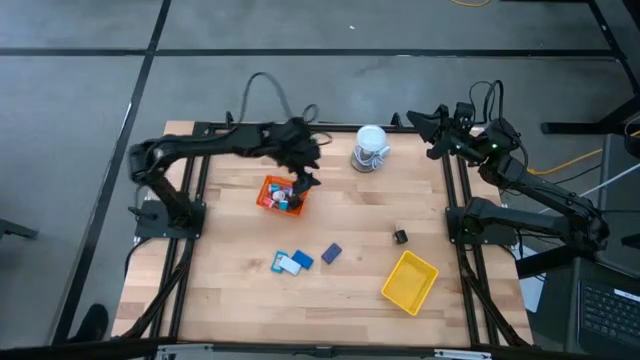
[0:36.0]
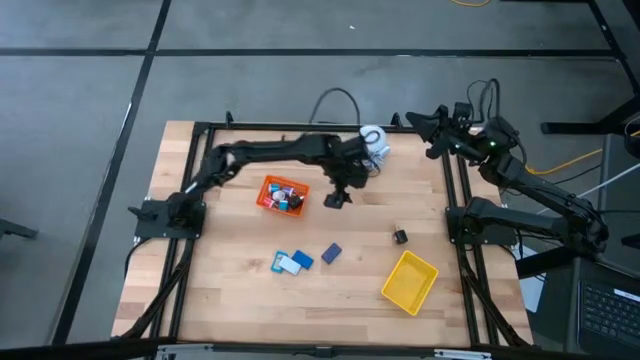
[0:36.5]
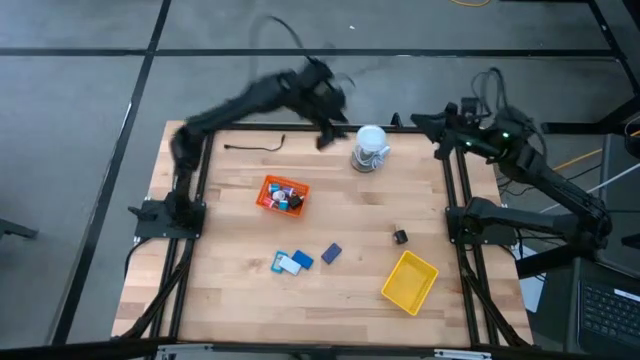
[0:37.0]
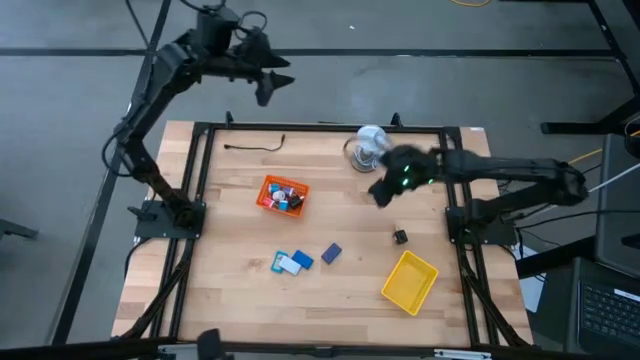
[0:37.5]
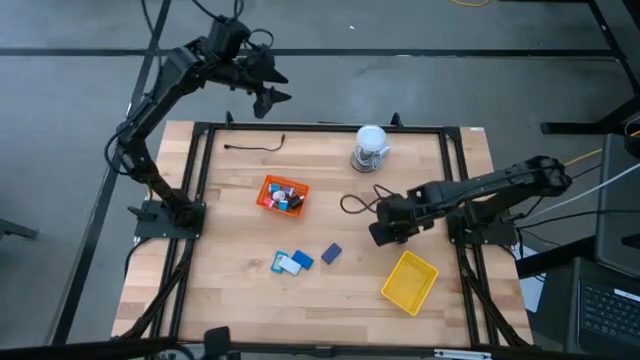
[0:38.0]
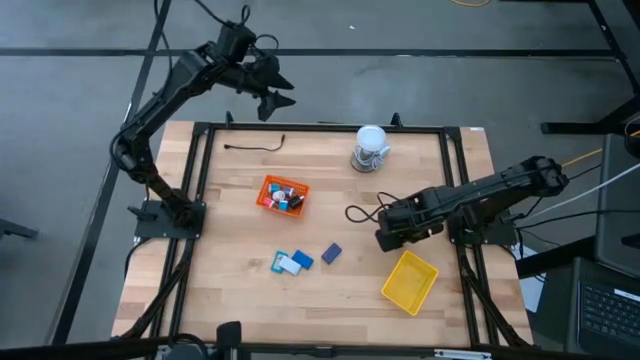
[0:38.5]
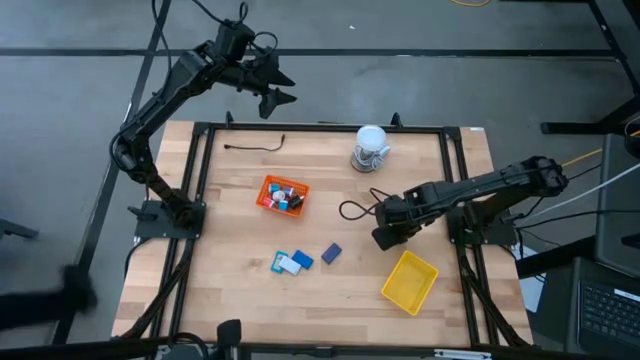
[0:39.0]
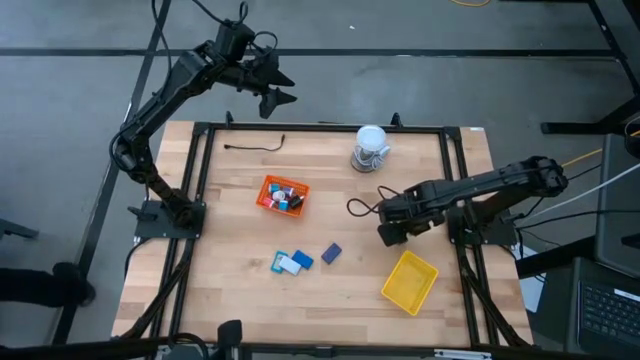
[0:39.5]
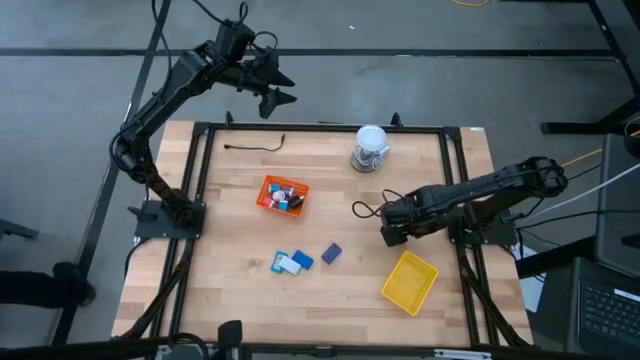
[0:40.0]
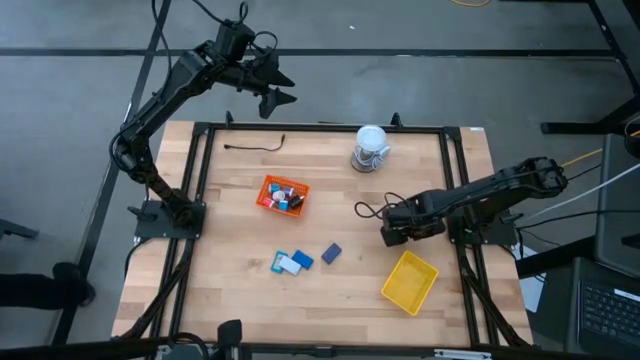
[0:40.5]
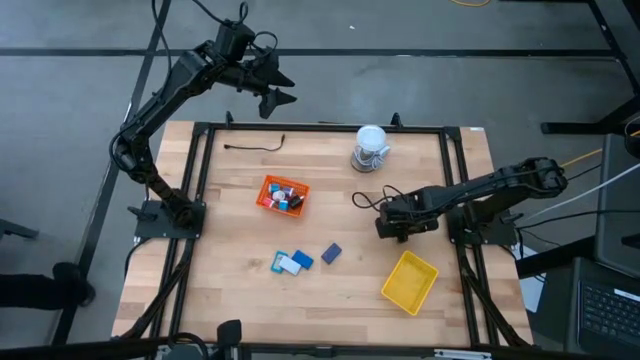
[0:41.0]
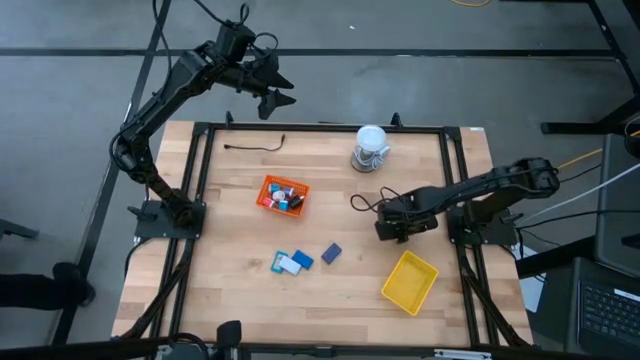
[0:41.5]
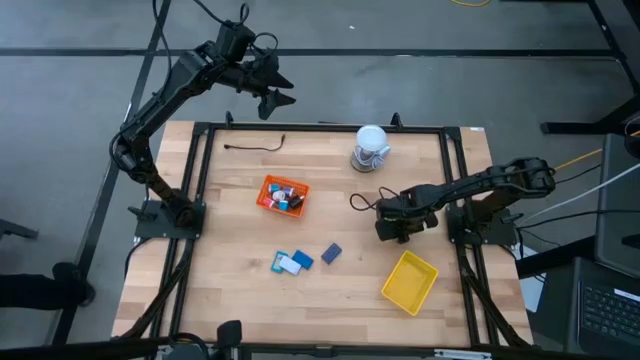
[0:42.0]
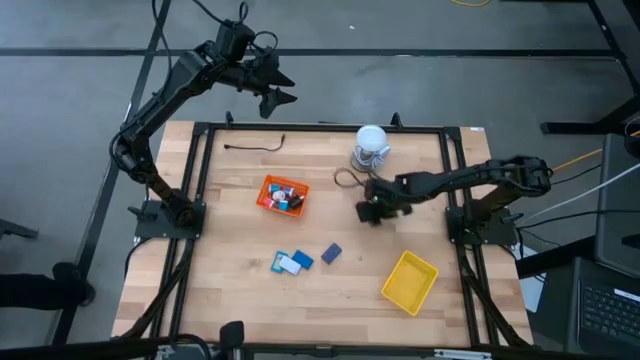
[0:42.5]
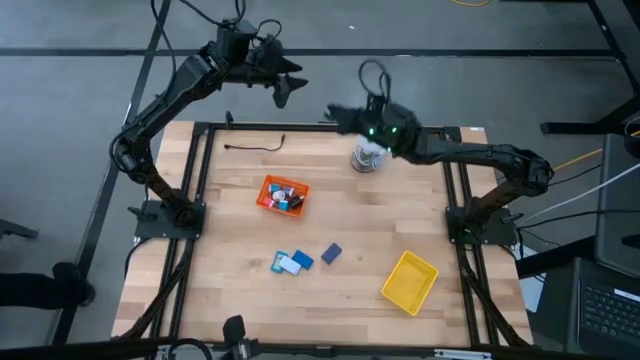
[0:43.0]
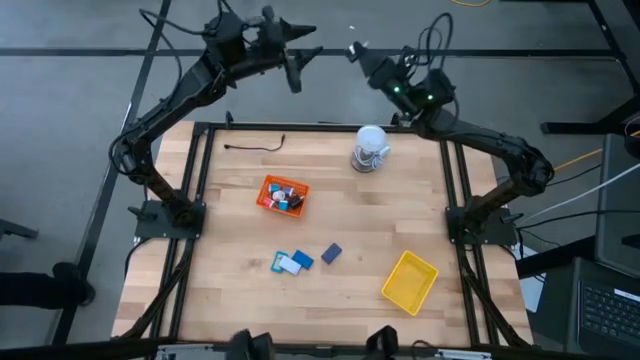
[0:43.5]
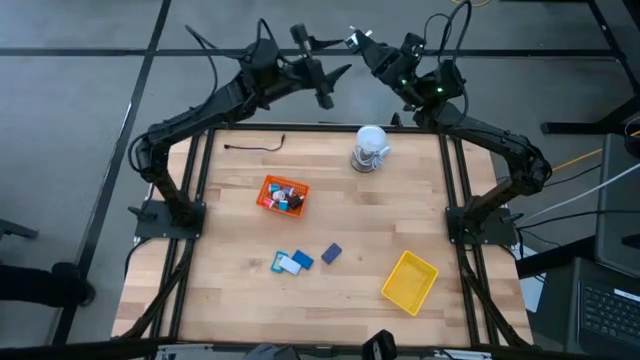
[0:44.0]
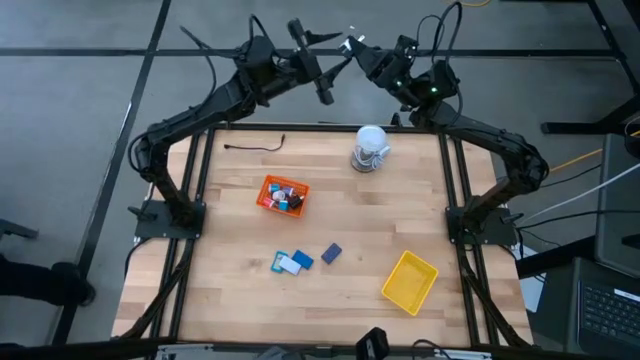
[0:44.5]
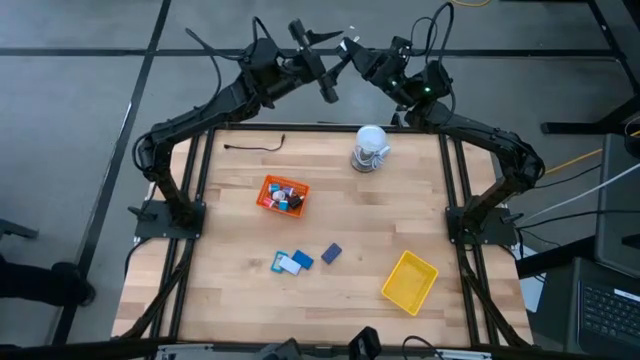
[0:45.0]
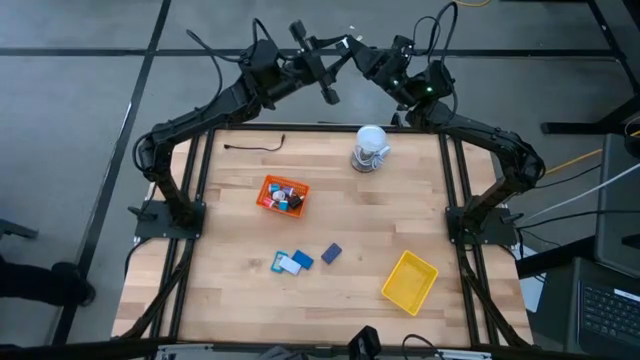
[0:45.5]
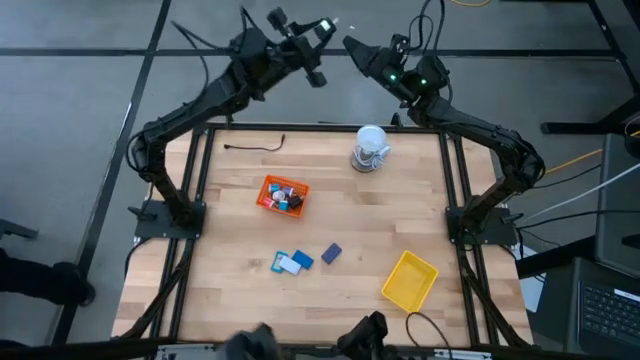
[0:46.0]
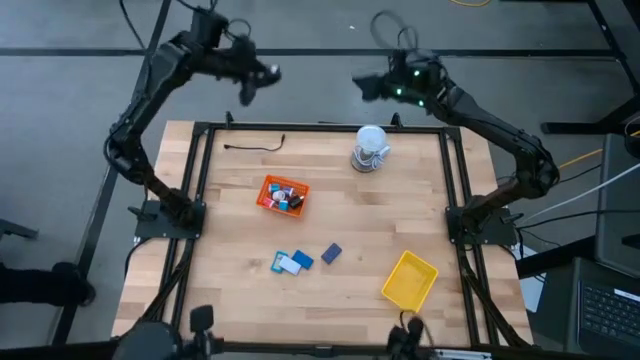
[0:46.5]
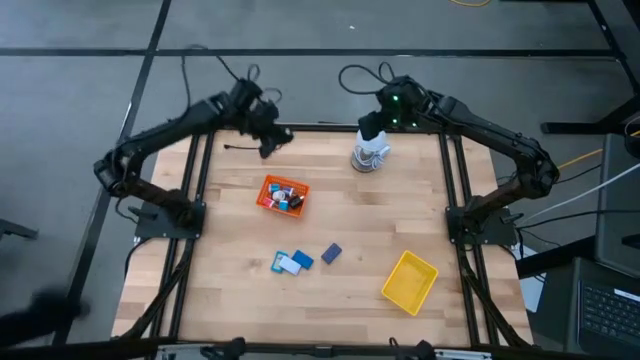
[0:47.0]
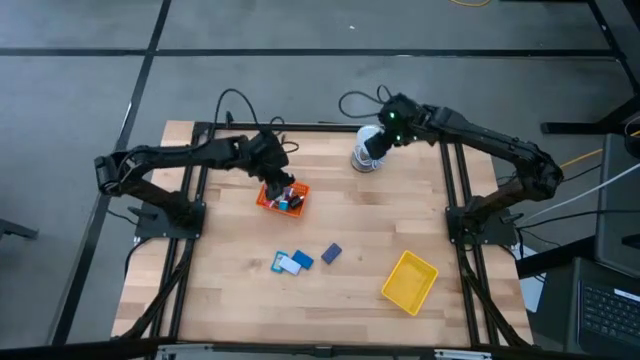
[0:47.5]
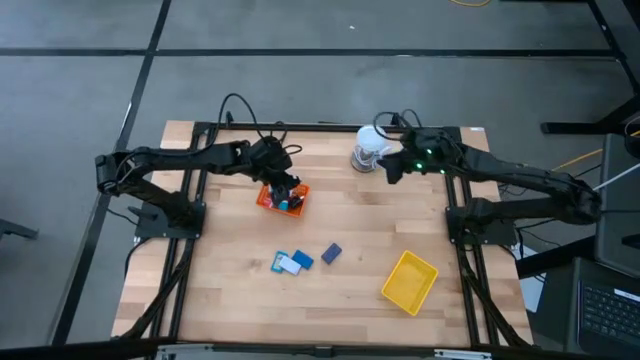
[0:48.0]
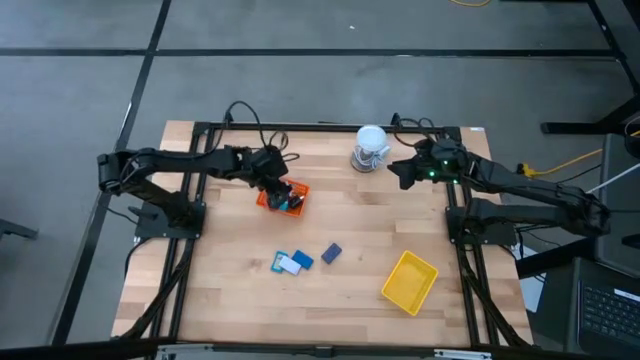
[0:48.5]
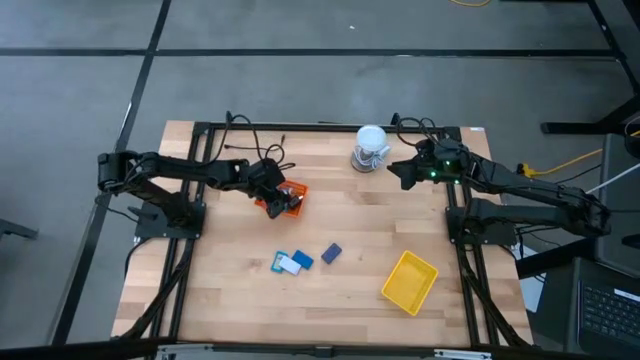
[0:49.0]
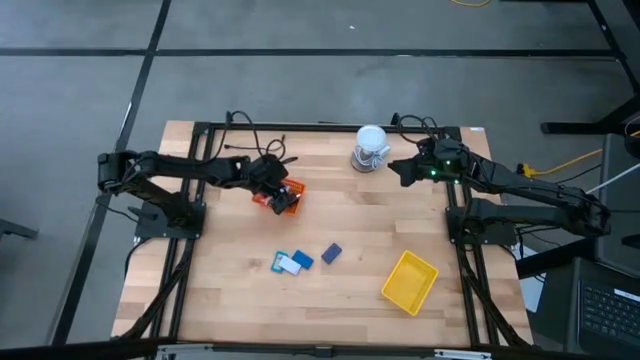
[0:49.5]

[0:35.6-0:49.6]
Task: Pick & Place Office items
Put the black charger adapter into the orange basket

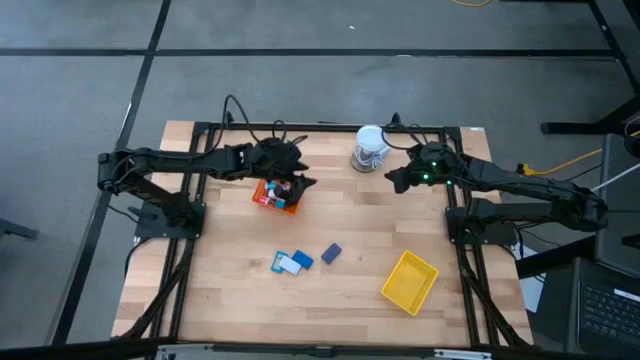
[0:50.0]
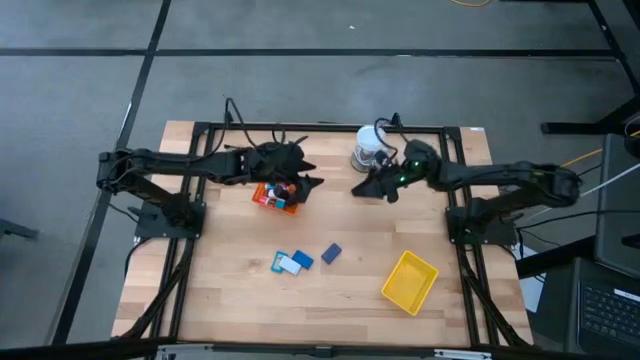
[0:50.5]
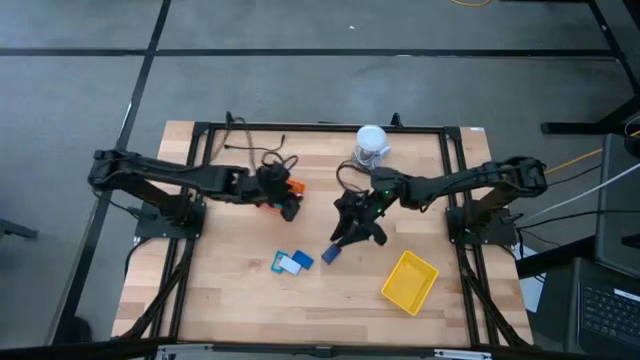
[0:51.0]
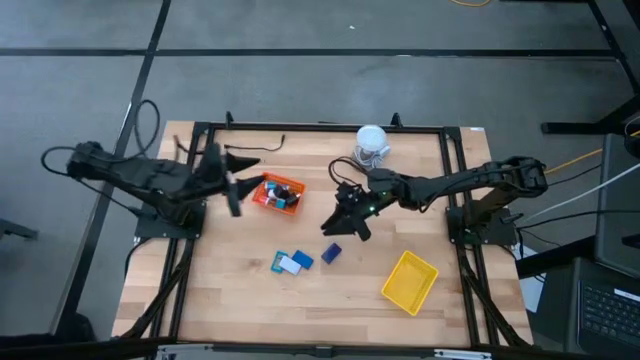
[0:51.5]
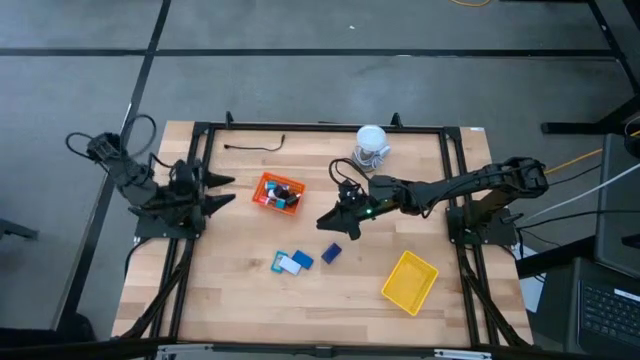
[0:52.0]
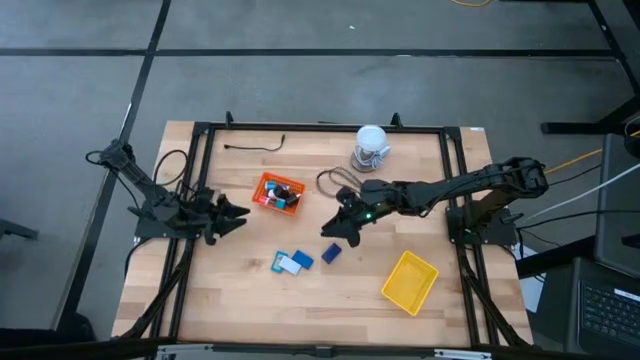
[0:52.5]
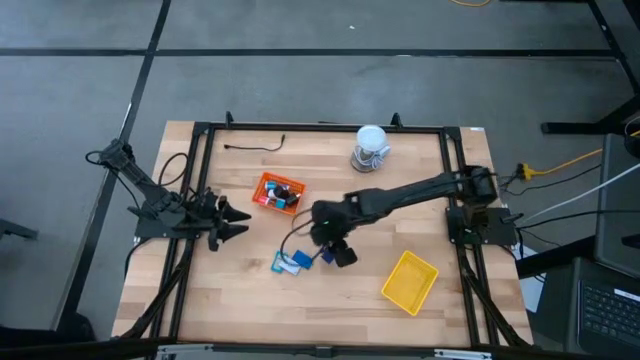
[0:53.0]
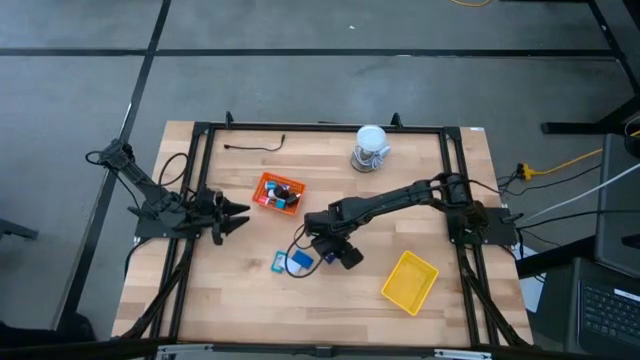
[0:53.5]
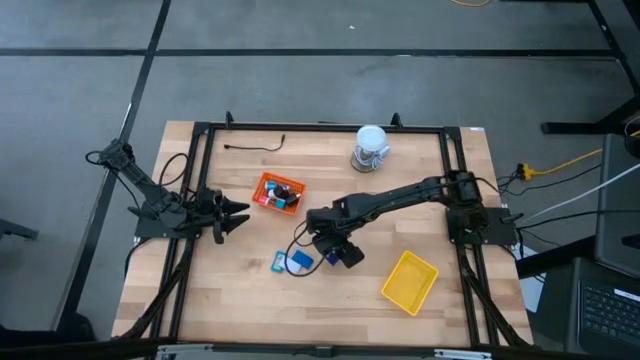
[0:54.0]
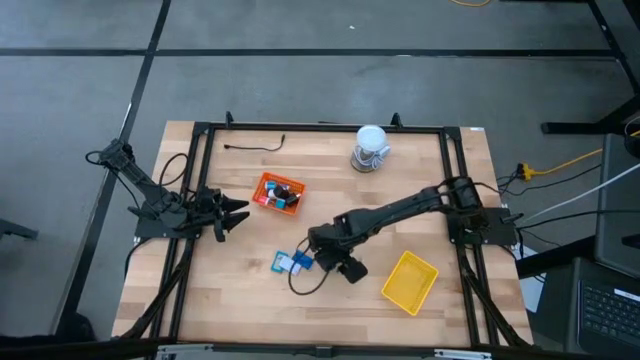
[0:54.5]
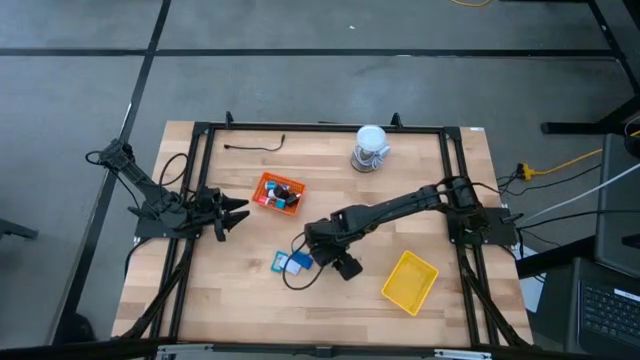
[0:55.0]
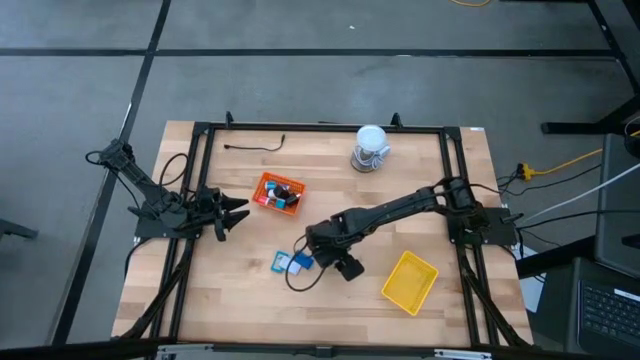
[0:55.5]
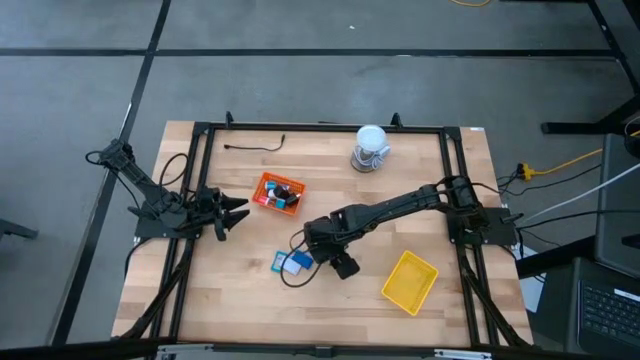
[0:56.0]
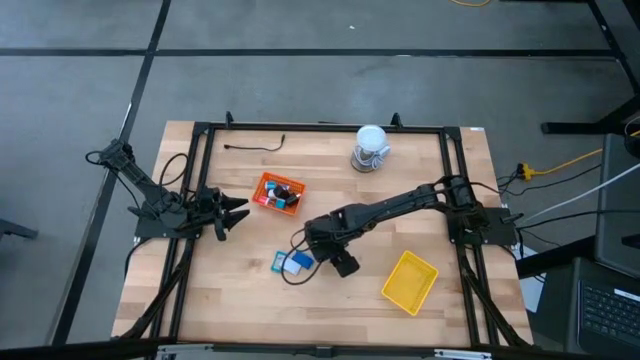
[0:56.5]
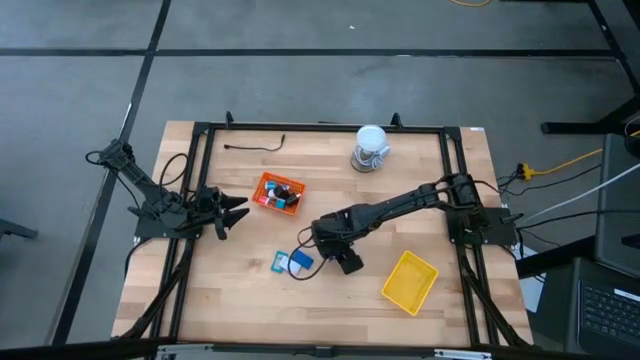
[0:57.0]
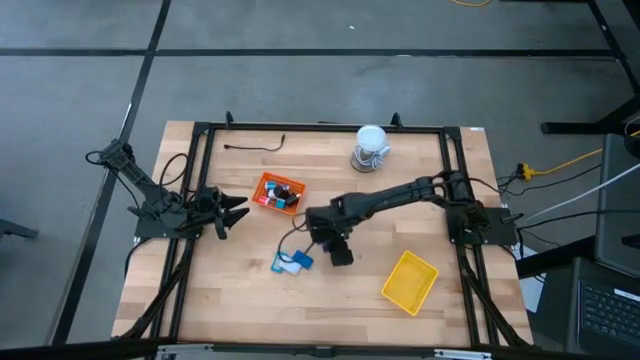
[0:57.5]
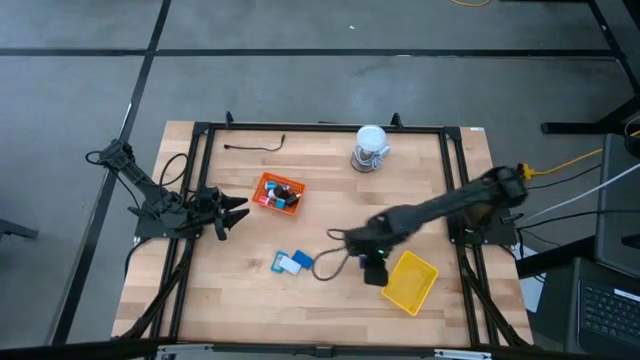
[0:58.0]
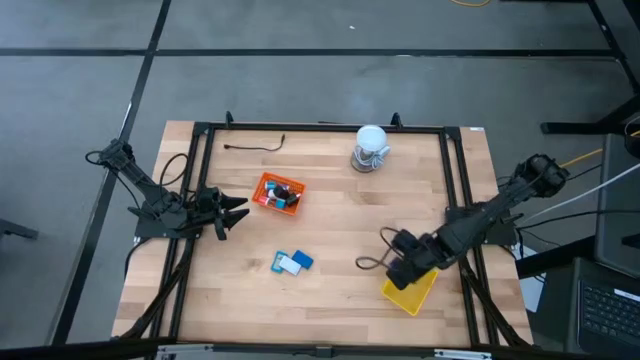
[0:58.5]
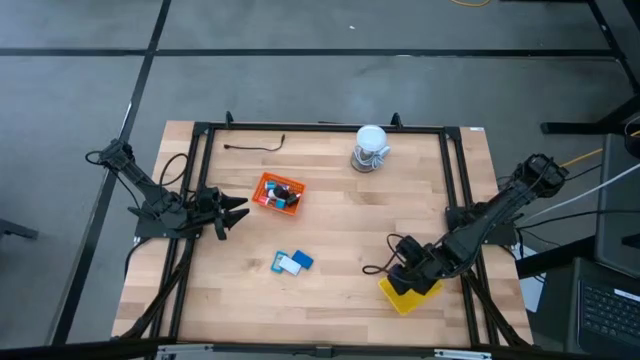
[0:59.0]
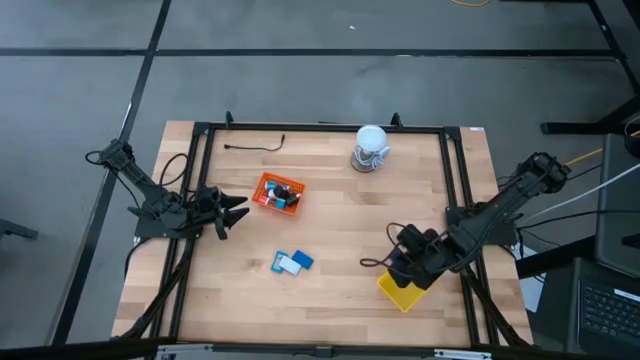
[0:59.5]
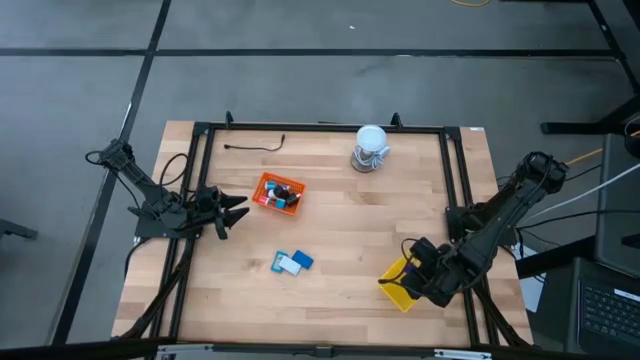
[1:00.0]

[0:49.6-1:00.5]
Put the dark blue digital clock into the yellow basket
